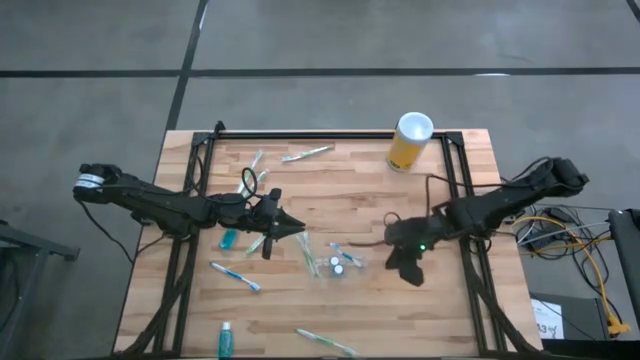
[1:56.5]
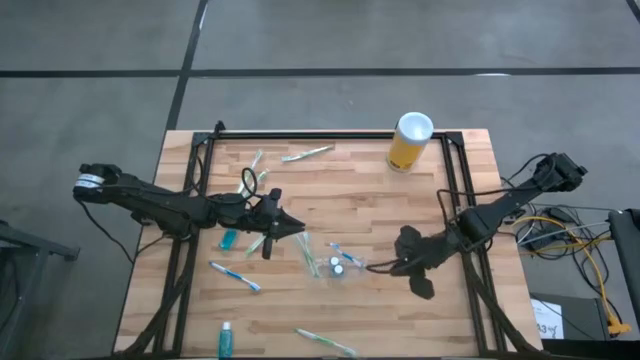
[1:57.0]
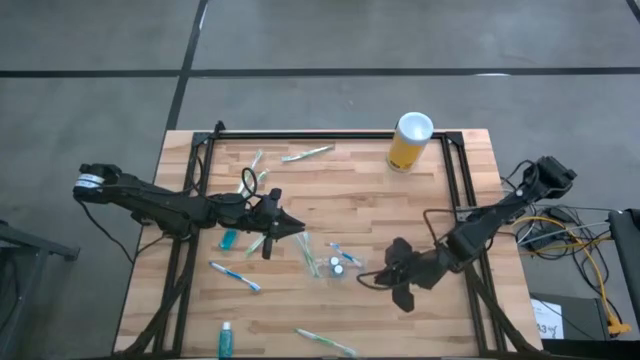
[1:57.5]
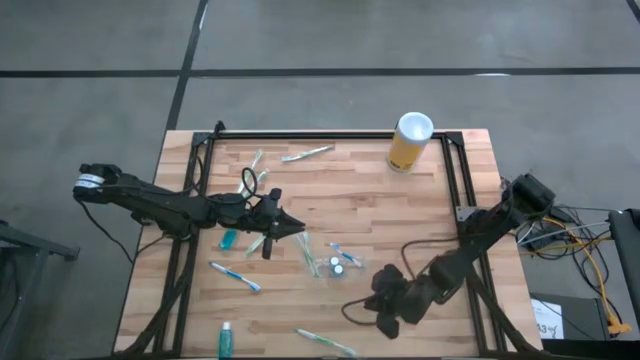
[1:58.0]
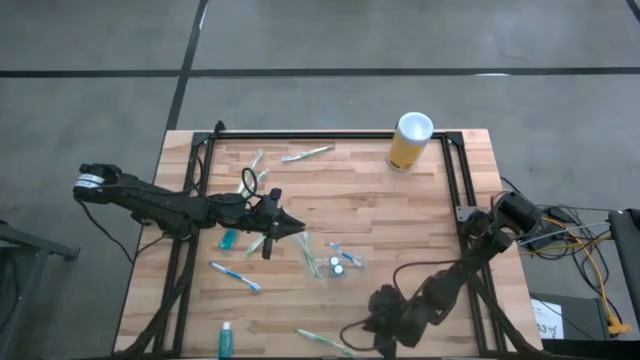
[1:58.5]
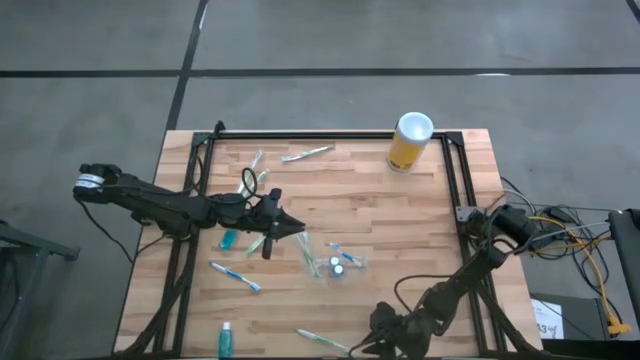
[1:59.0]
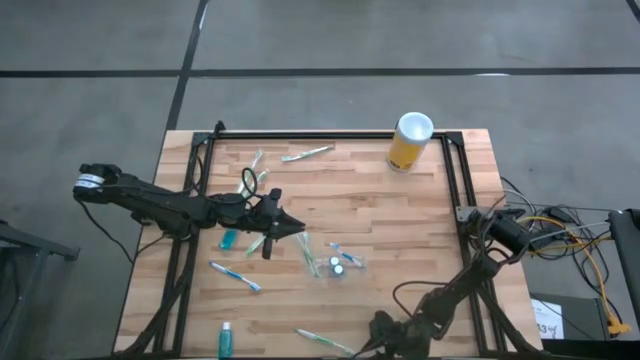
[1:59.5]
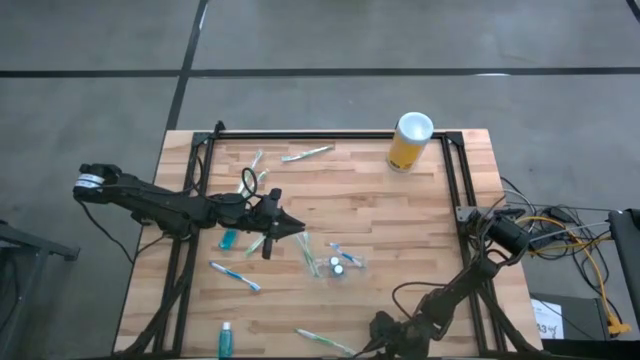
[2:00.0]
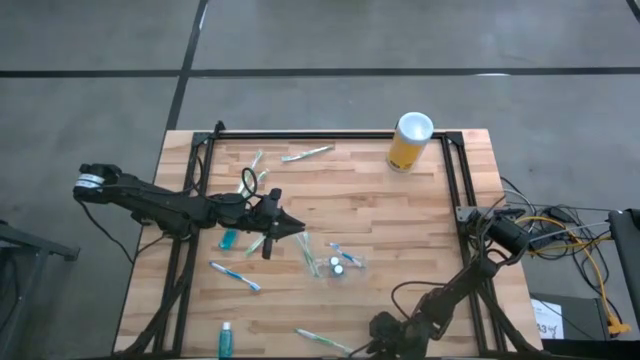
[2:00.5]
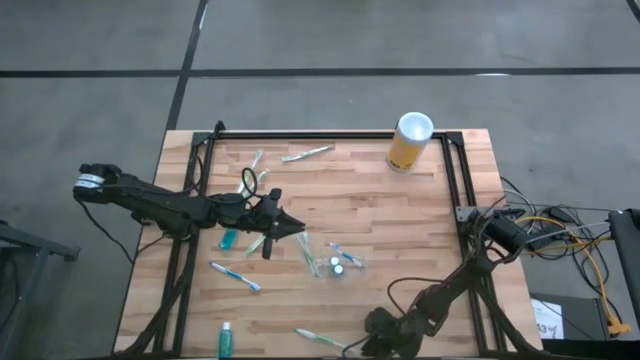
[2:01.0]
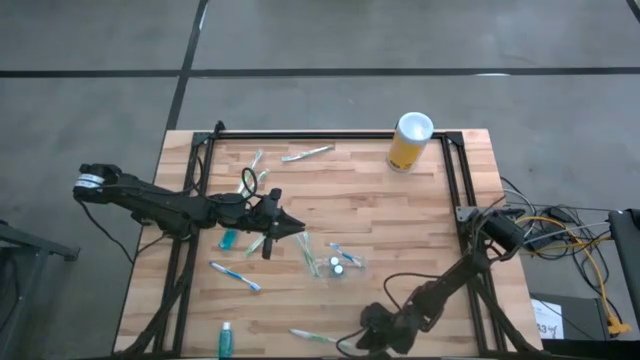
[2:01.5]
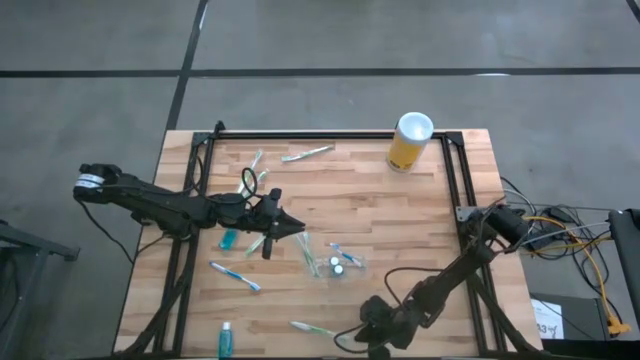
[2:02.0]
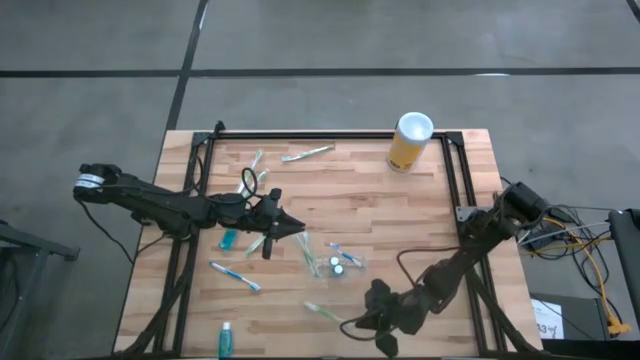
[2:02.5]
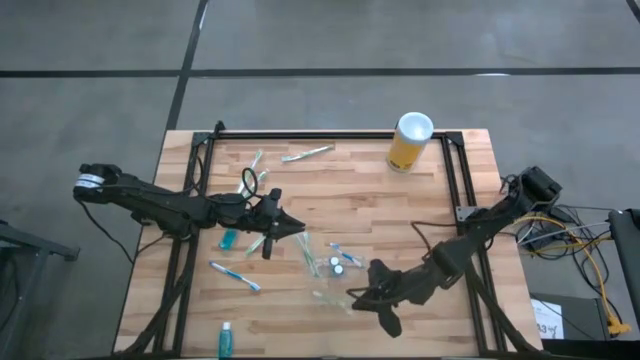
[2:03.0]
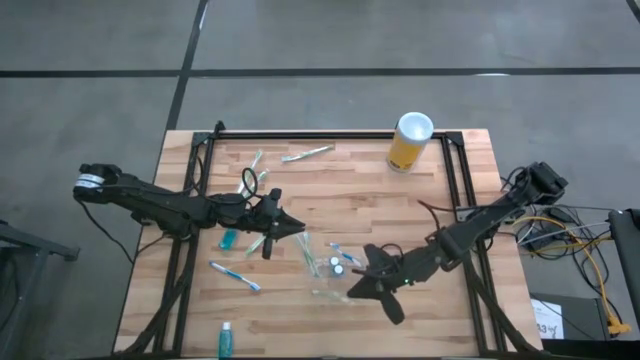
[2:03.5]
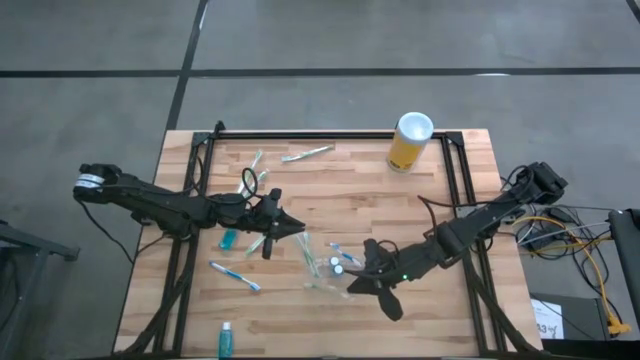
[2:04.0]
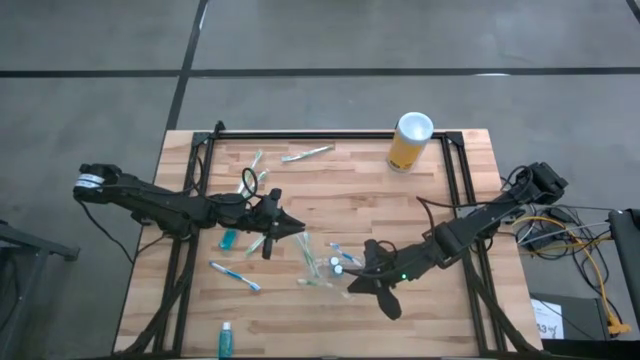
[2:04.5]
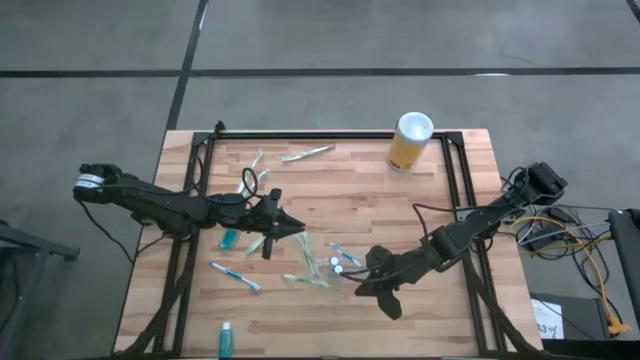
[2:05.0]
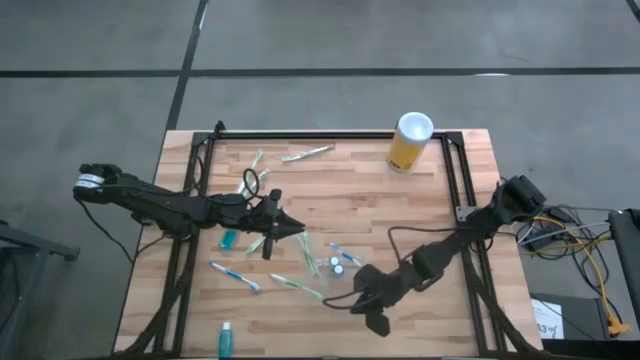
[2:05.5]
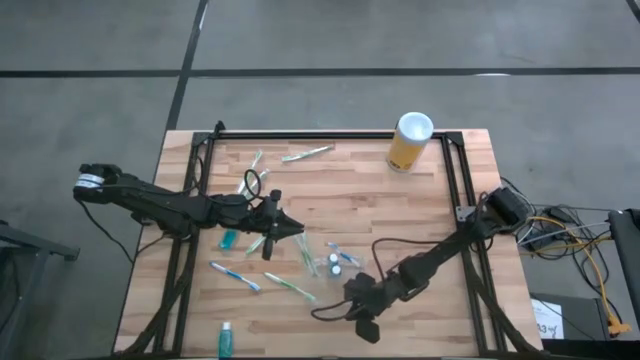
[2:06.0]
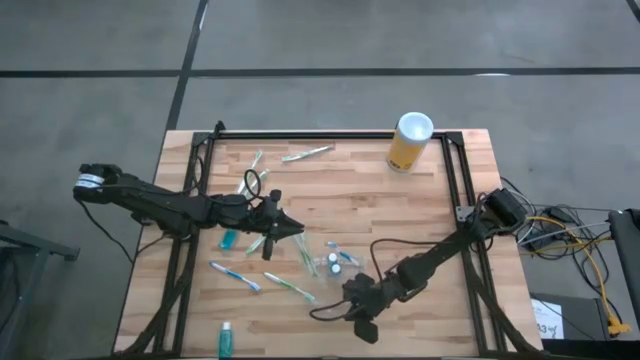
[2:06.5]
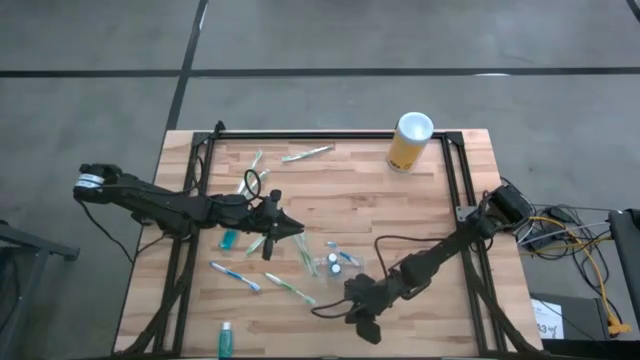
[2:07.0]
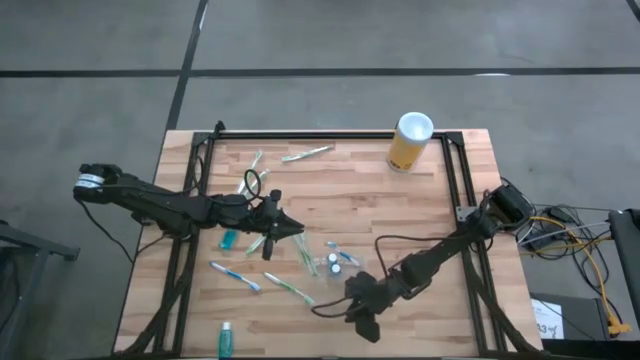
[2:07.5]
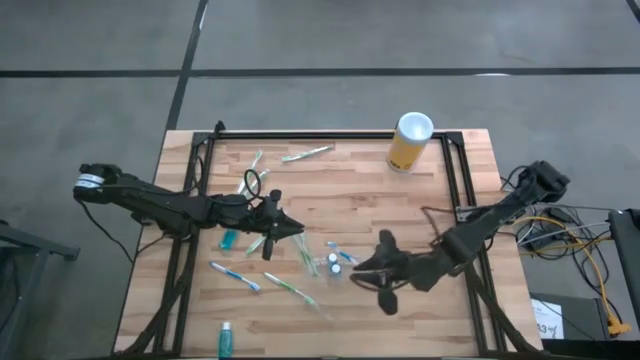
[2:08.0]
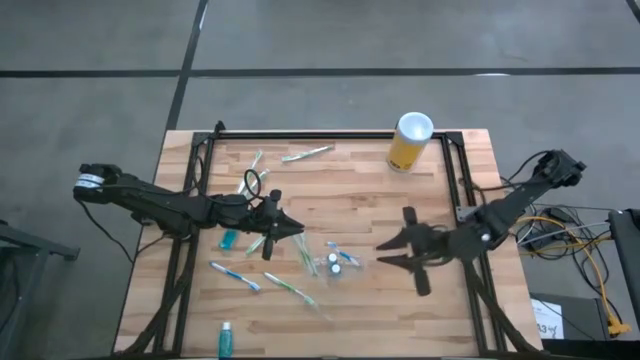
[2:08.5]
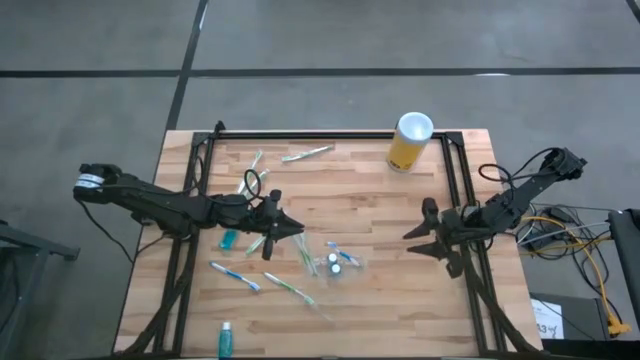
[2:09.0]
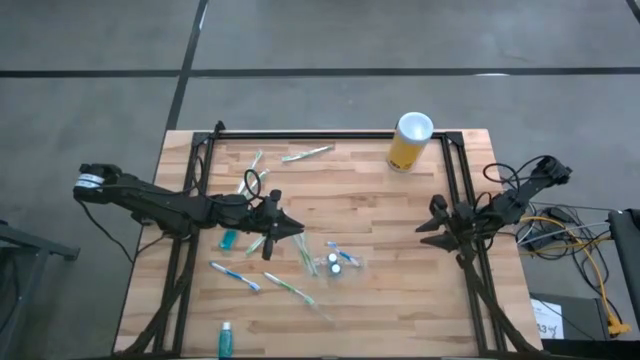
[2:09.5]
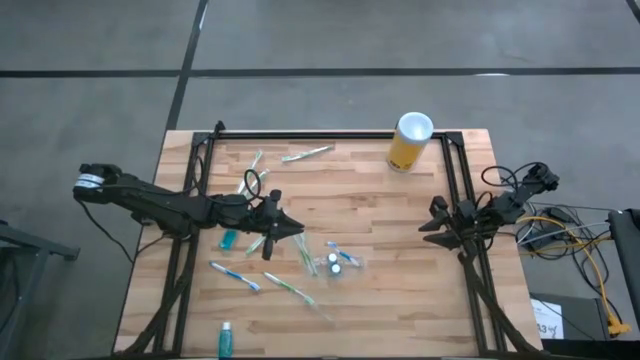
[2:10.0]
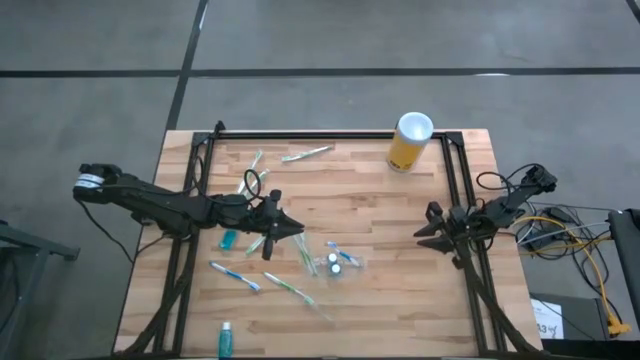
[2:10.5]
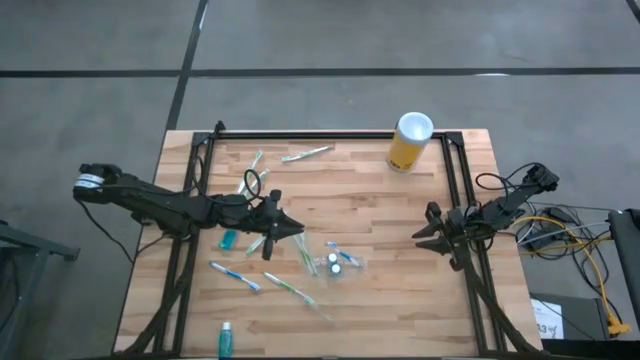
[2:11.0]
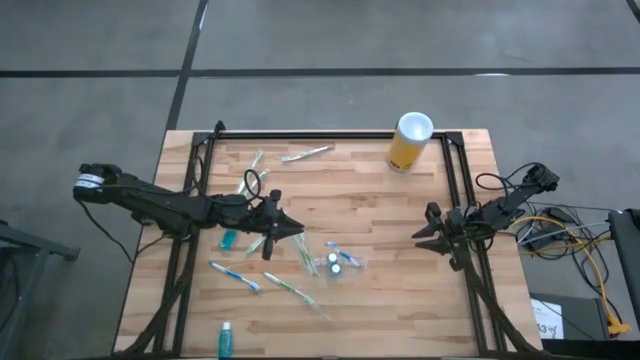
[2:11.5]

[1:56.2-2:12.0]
Task: Pick & Place toothbrushing station
Put the green toothbrush into the transparent organizer

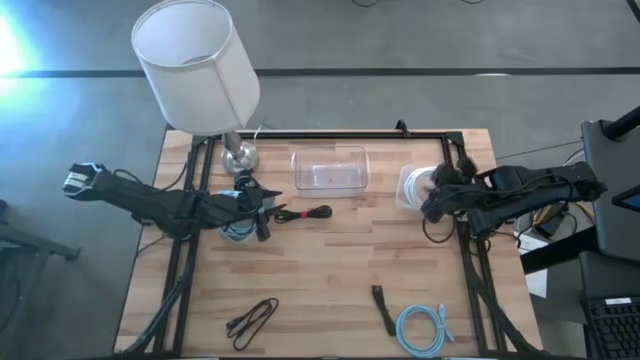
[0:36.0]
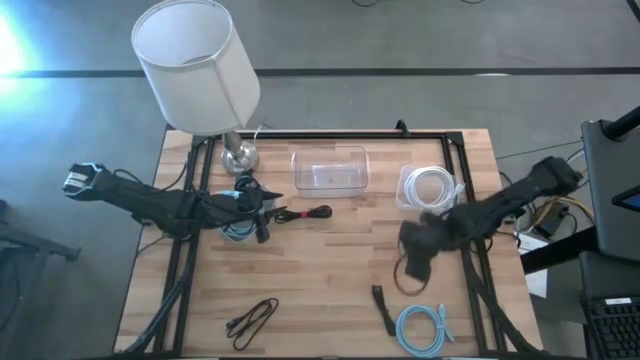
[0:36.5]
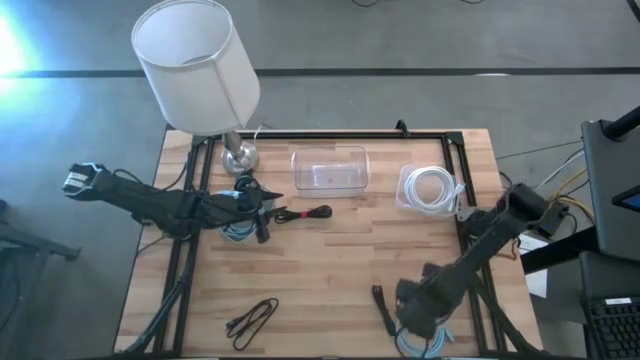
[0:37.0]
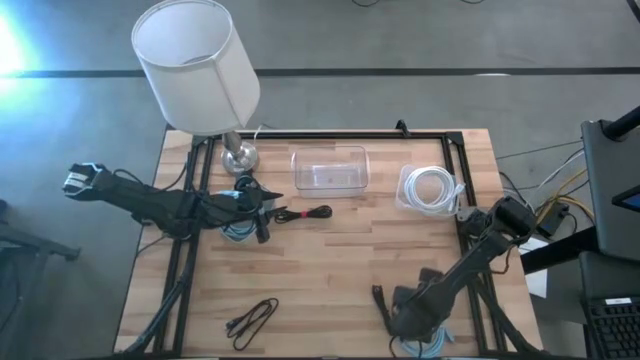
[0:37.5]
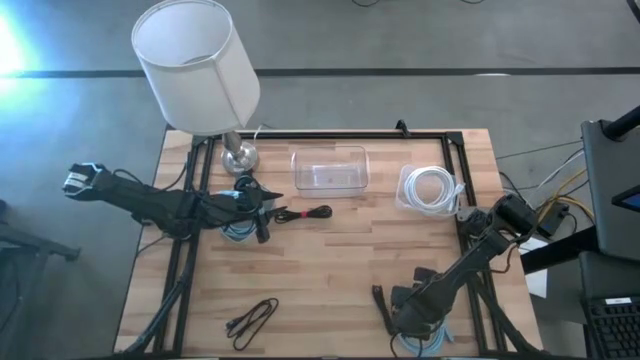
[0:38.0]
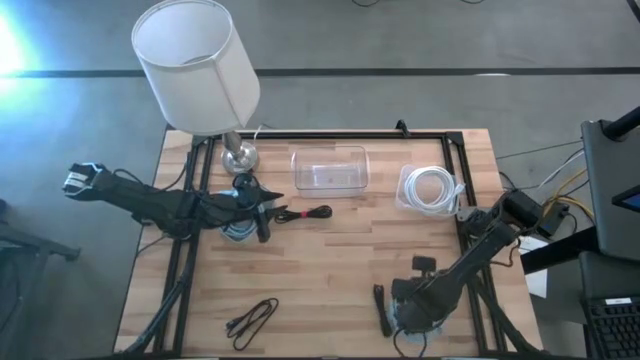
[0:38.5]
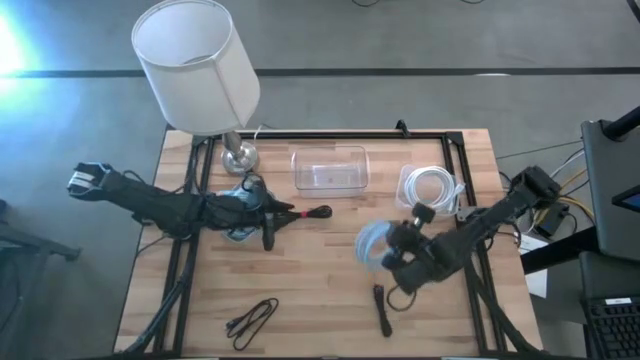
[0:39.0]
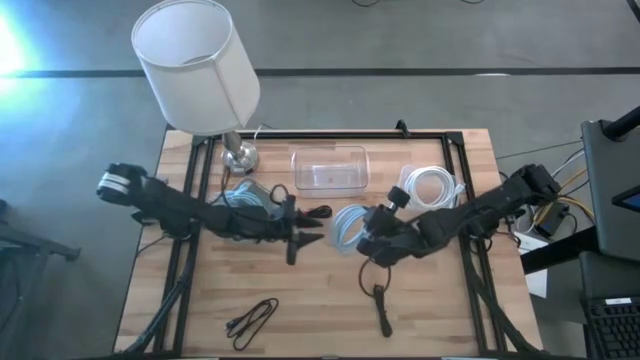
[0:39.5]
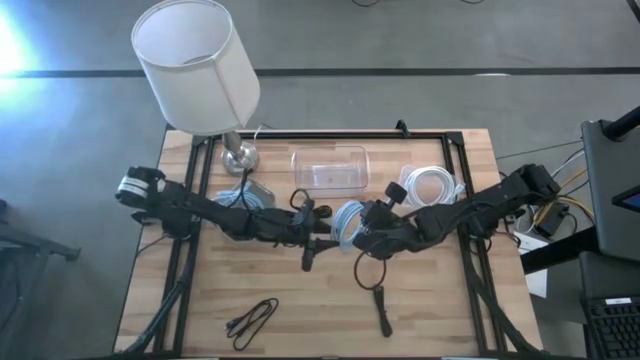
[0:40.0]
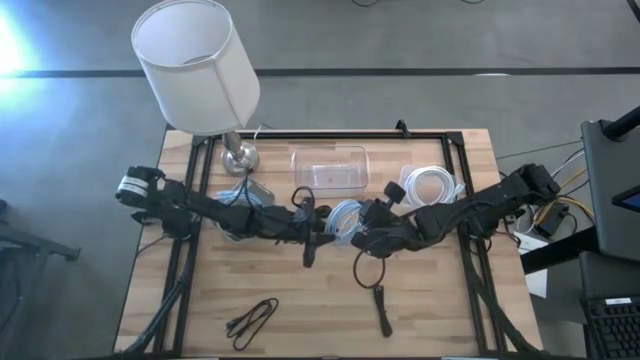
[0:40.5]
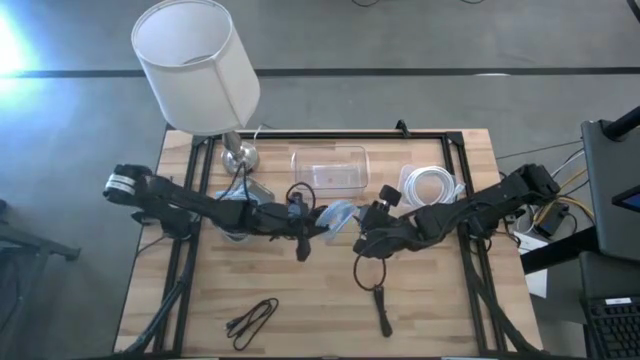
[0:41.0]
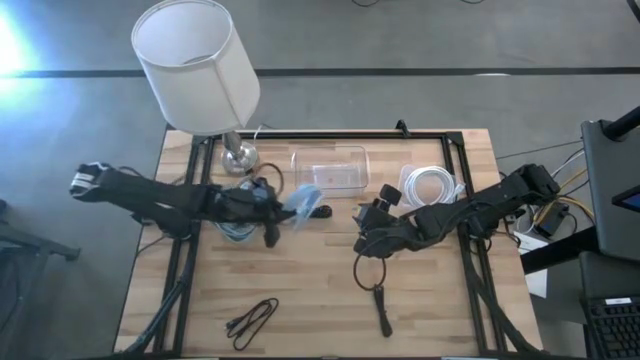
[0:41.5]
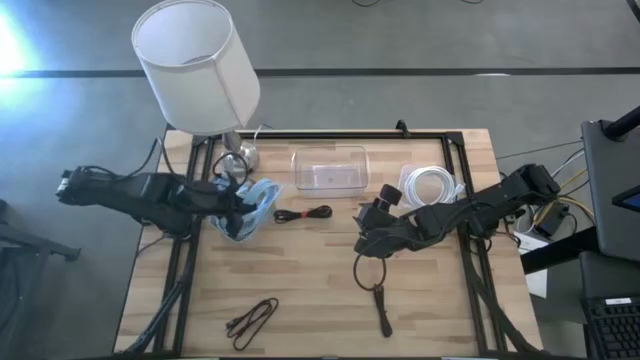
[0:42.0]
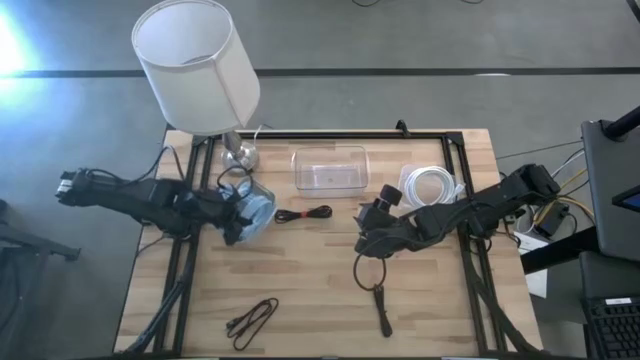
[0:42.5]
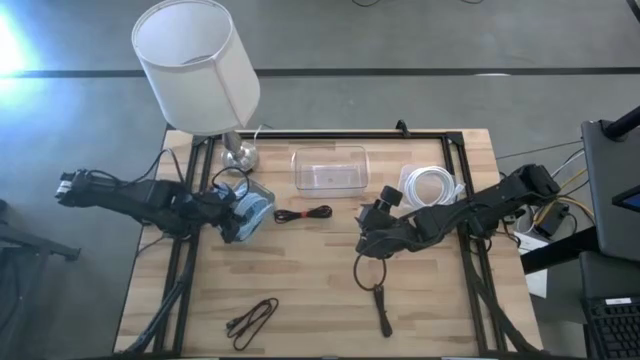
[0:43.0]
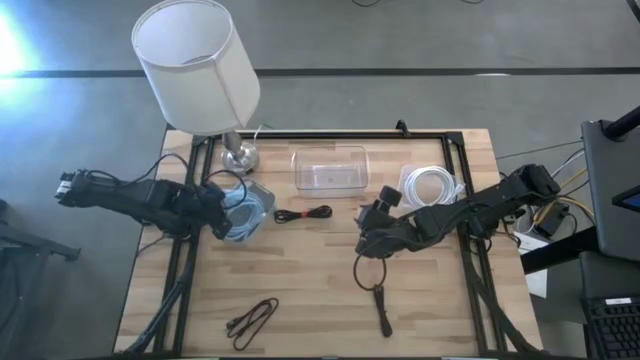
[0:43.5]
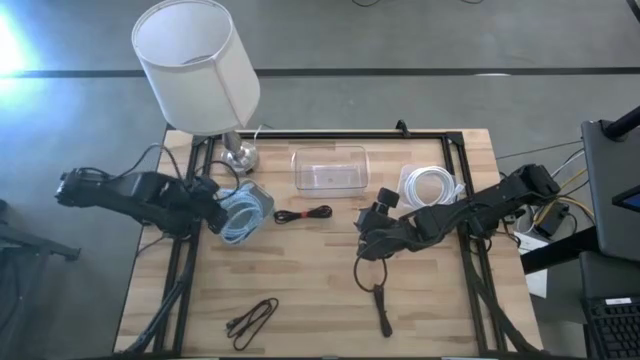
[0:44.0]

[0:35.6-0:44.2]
Task: Pick & Place USB Port
Put the blue USB cable into the gray bin
